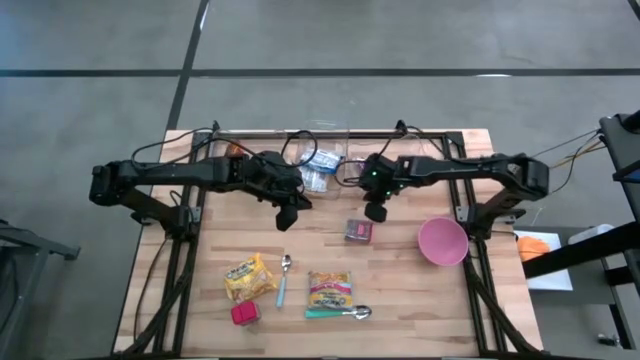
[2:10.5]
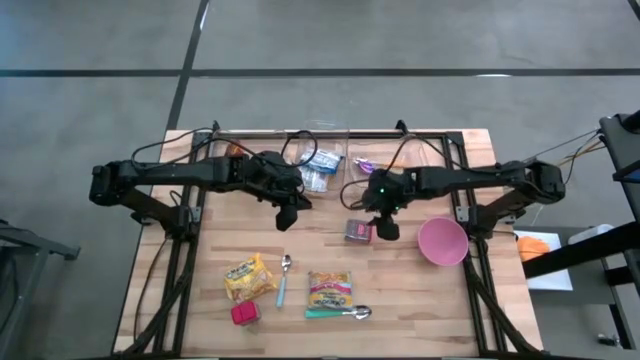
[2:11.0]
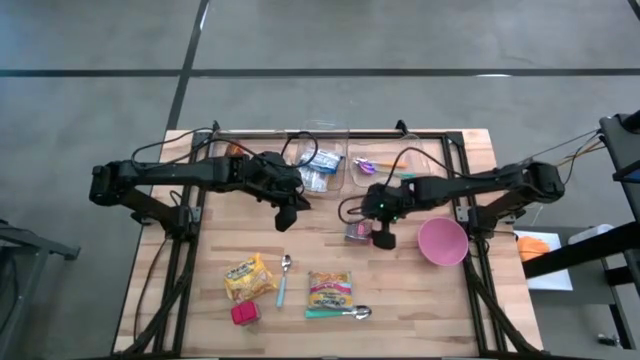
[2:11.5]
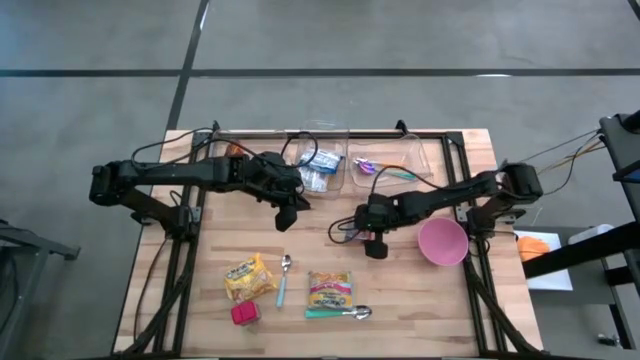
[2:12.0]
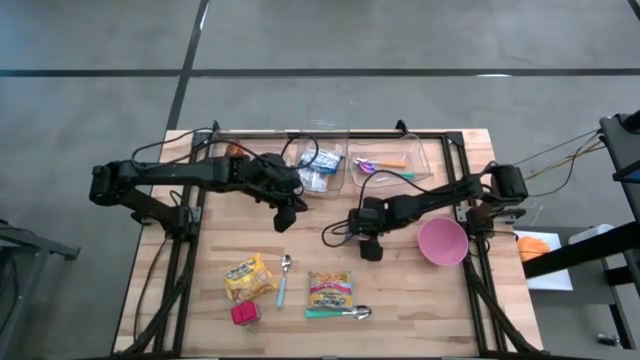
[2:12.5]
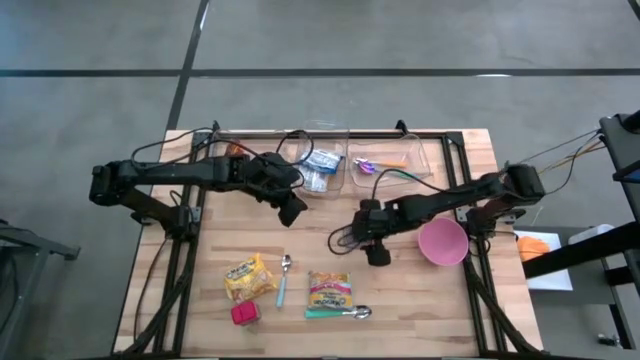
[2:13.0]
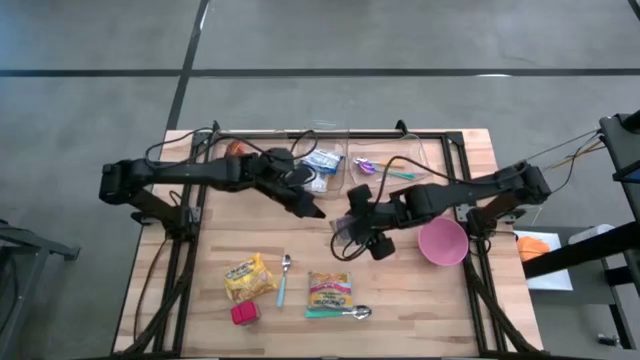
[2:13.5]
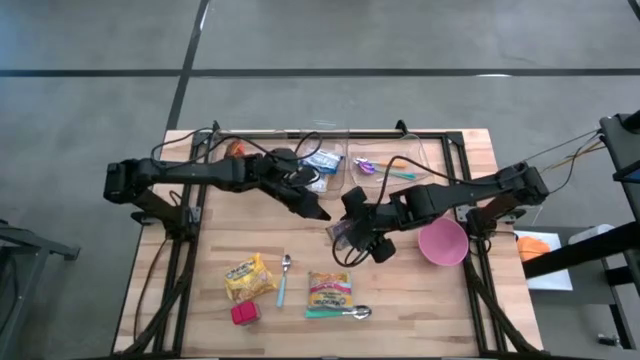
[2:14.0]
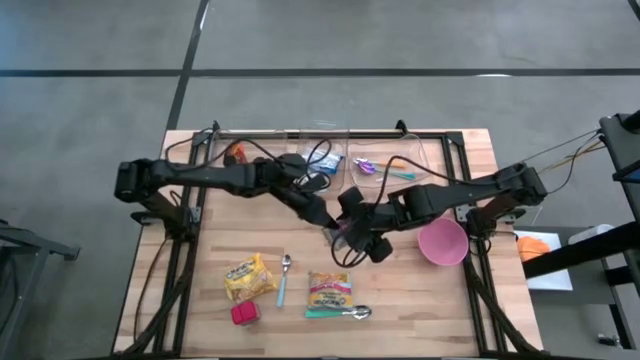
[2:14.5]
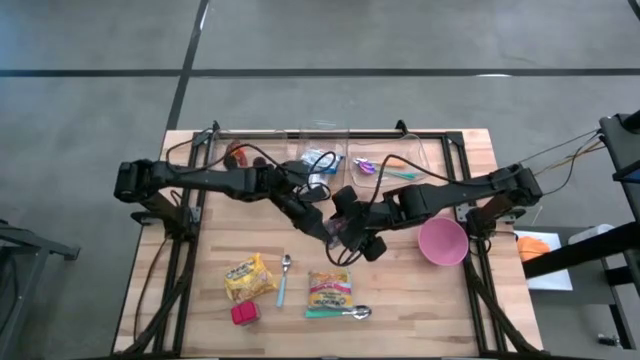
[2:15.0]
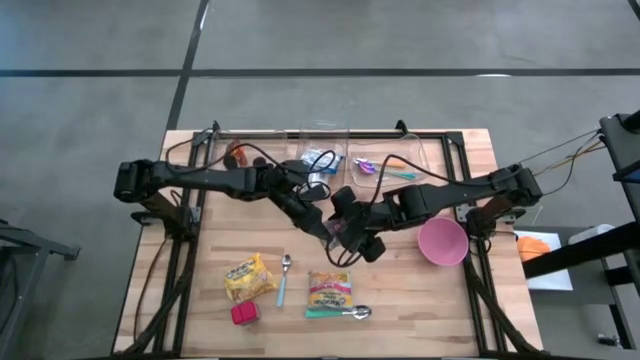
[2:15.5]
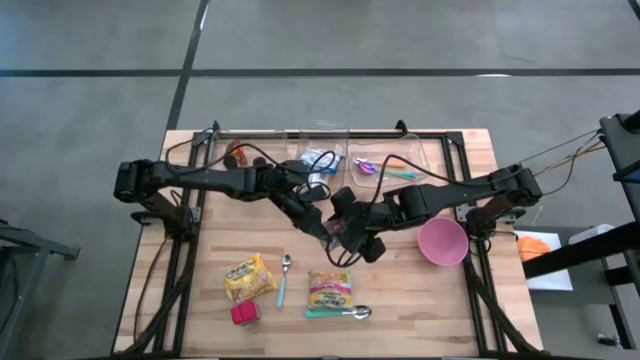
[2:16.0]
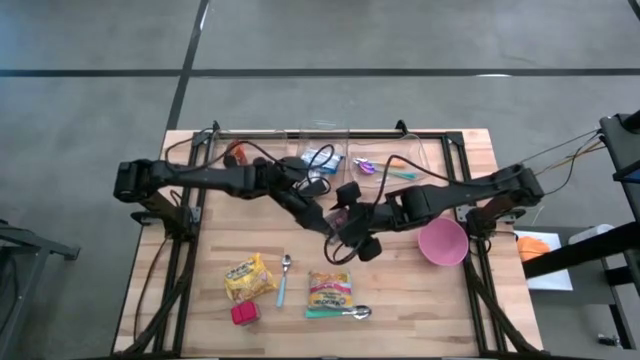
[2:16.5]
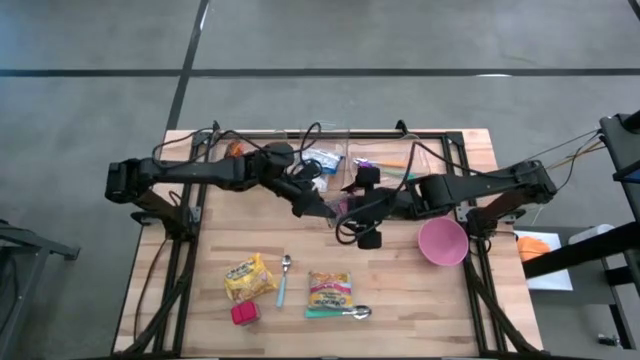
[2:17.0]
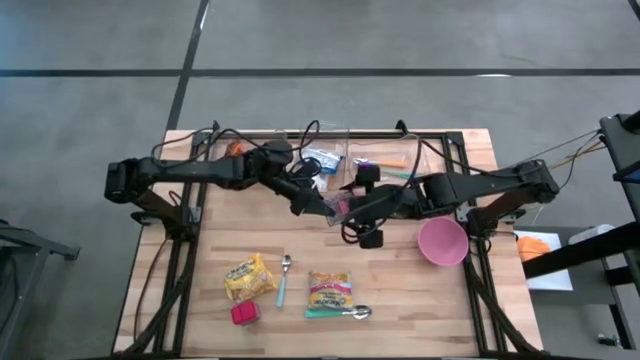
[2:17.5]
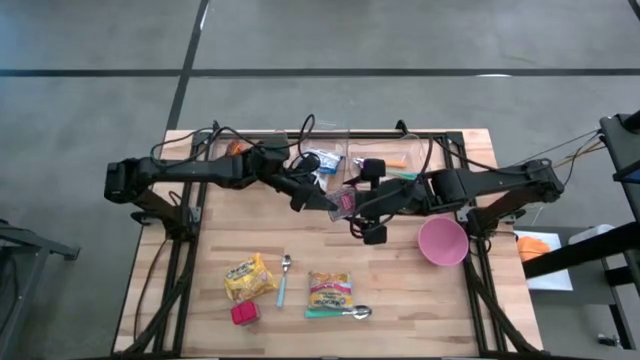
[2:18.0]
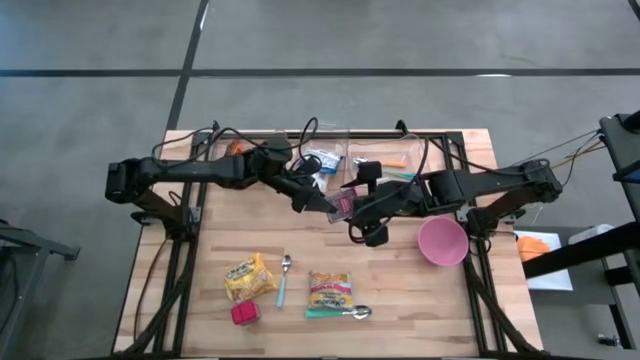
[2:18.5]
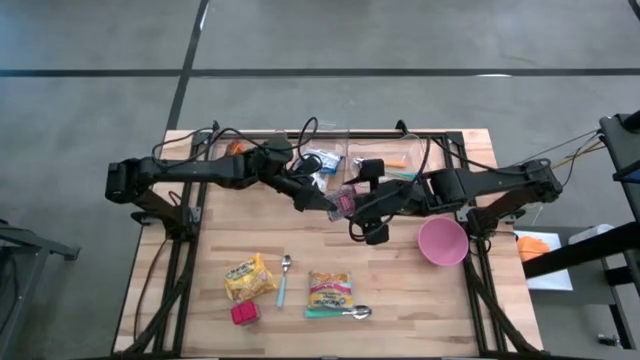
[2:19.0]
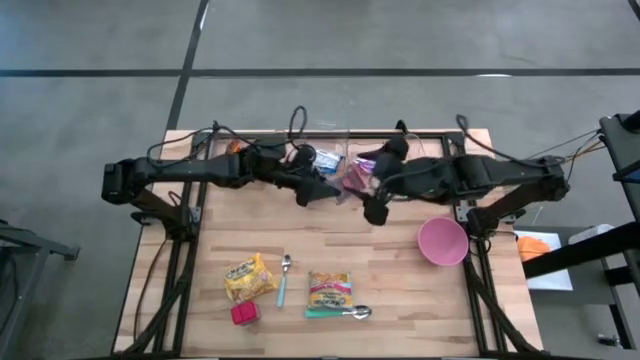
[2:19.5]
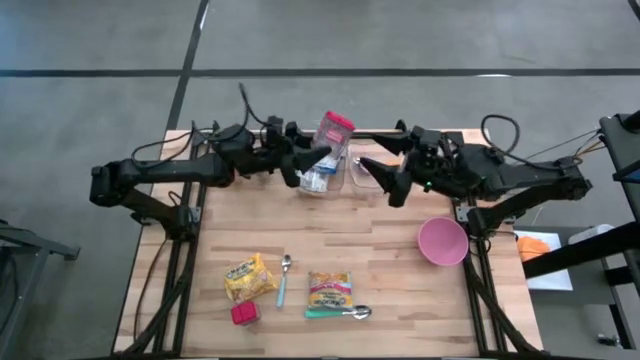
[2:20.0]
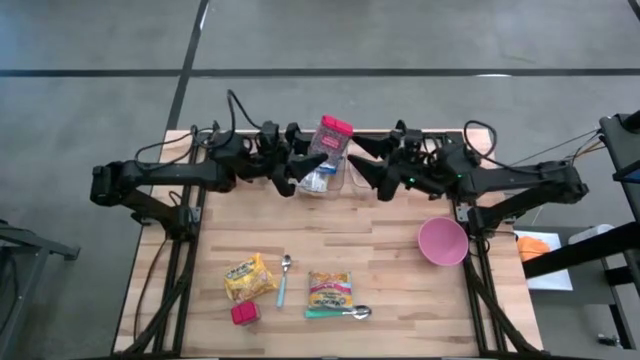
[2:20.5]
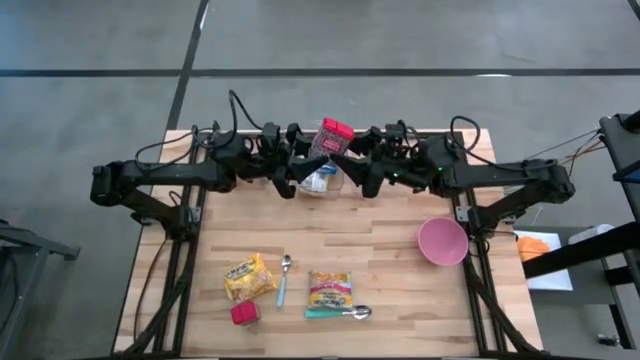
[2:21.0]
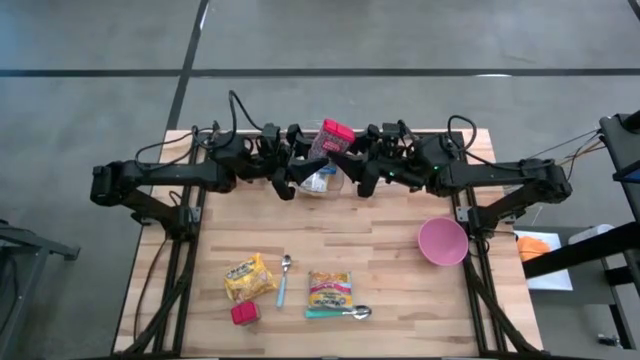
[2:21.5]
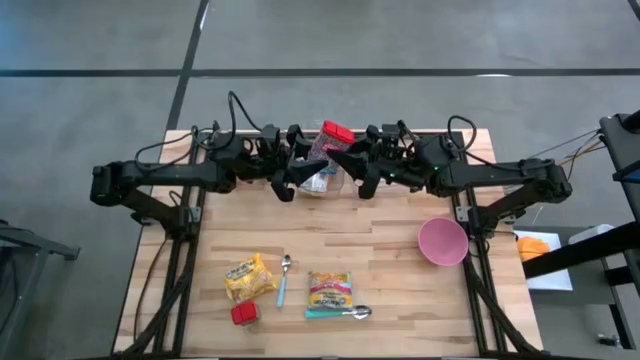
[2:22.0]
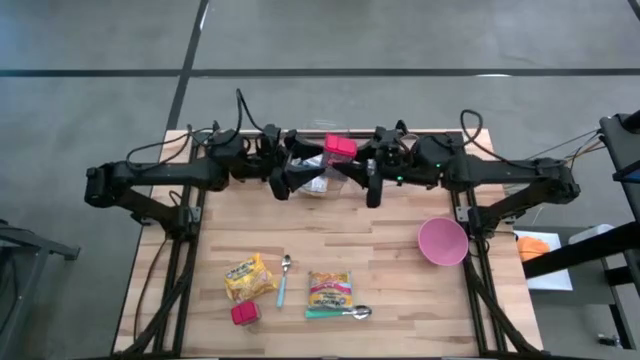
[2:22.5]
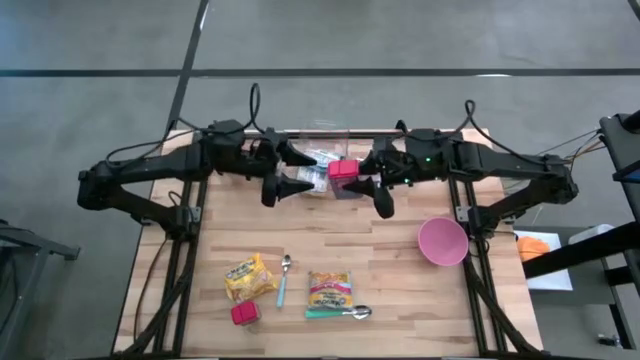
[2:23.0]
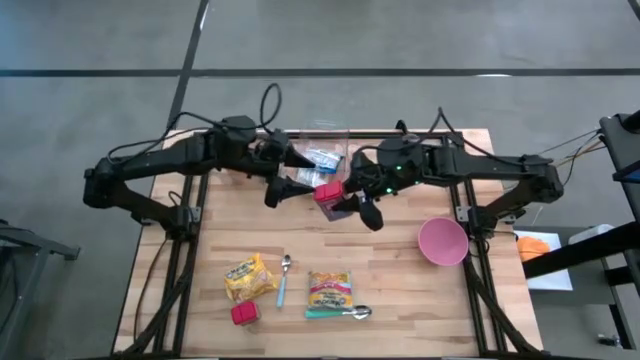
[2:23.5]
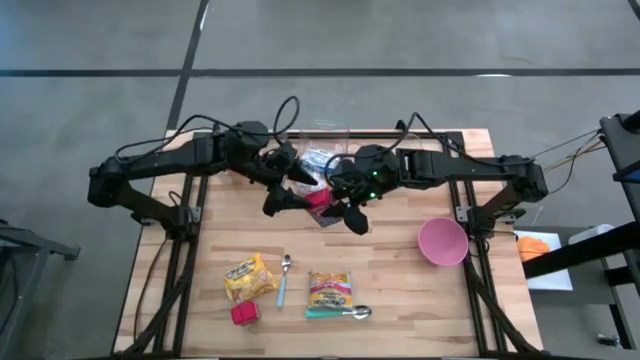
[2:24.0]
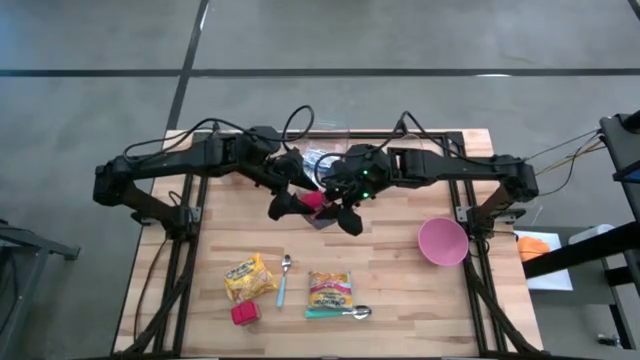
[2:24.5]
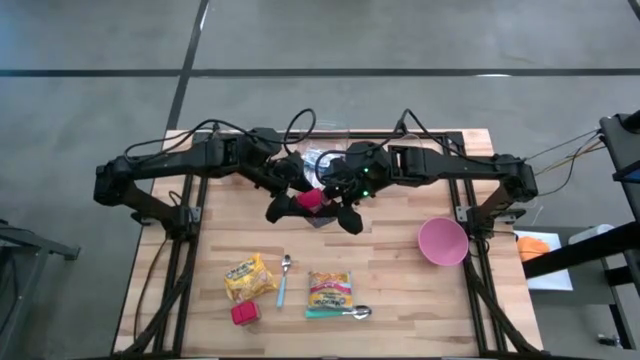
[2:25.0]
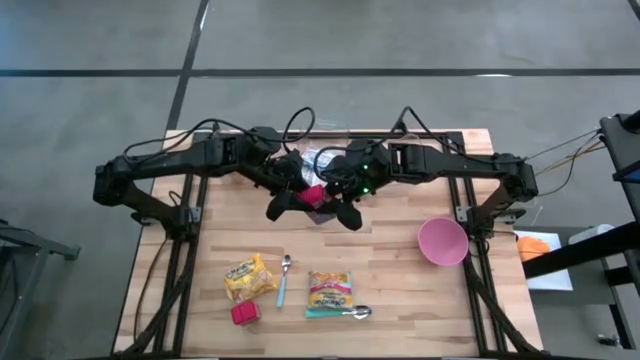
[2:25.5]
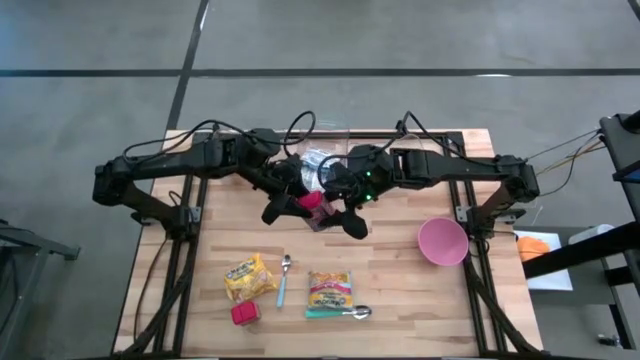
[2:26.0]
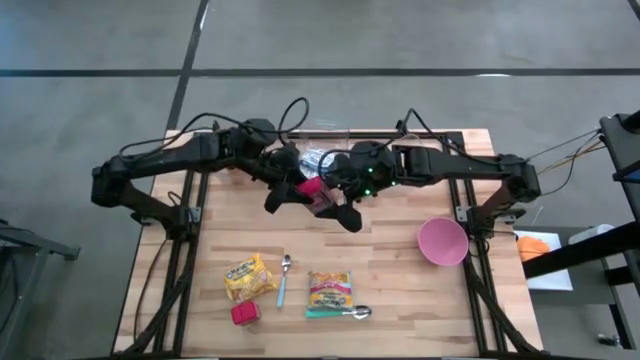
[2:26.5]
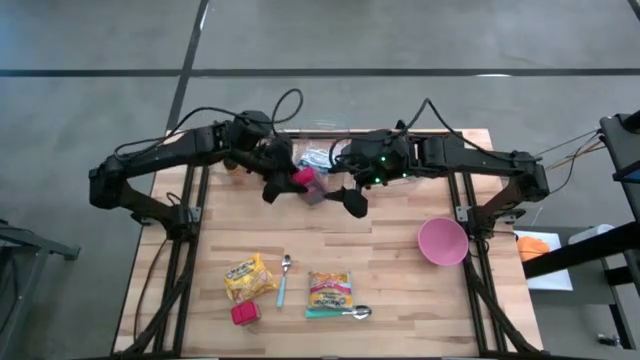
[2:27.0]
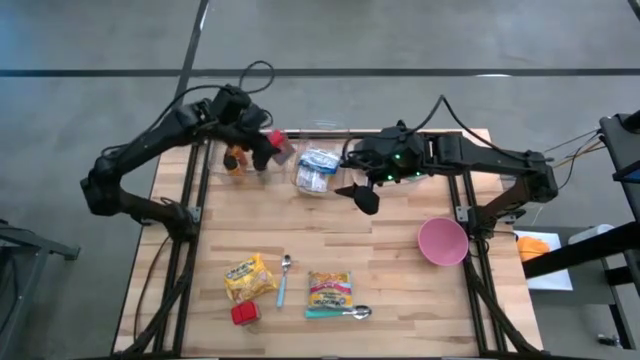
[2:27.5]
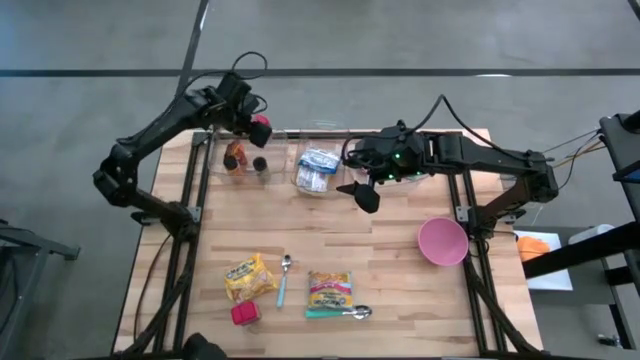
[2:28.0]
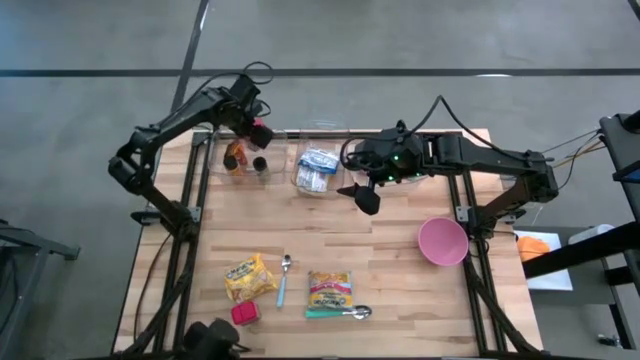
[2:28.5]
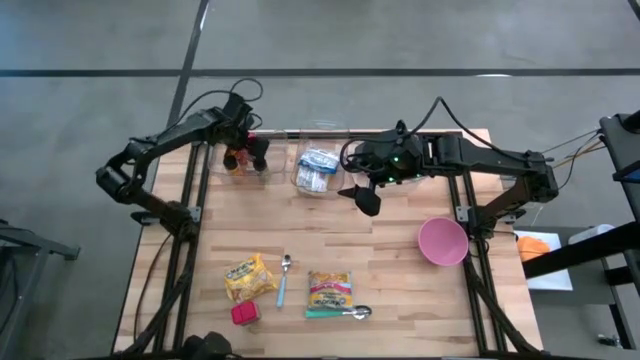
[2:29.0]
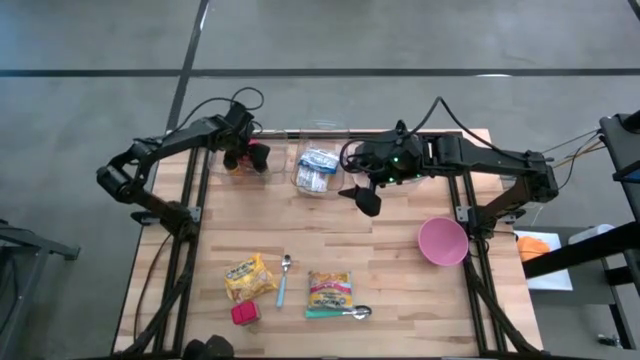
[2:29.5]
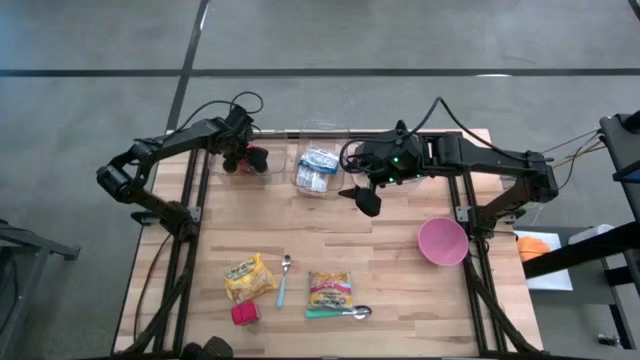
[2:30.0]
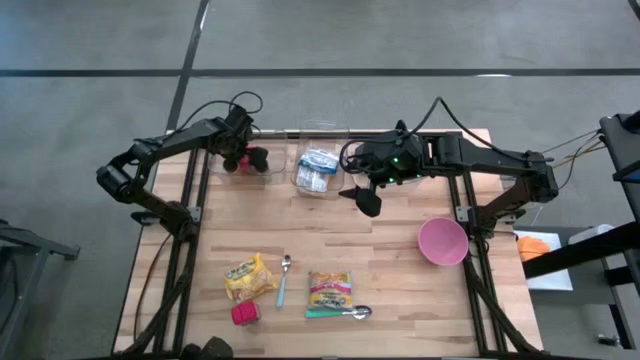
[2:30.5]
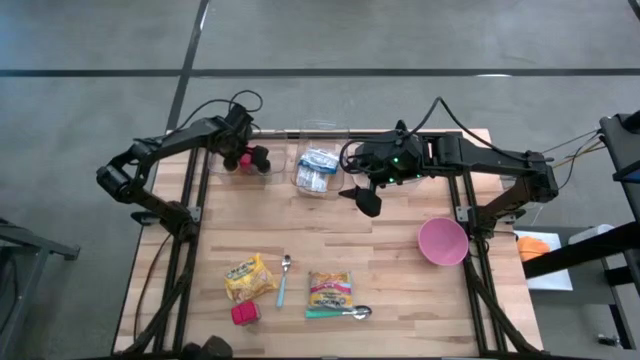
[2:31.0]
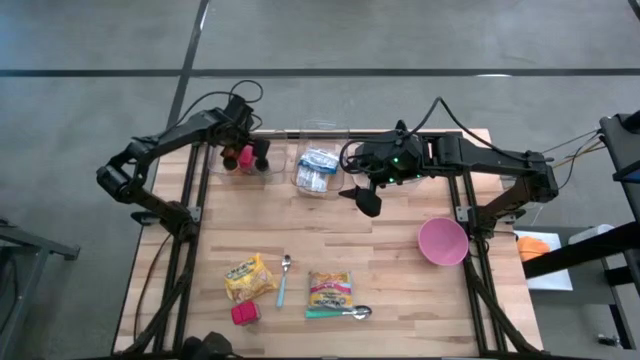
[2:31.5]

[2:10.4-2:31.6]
Put the top red seasoning can into the left transparent bin
